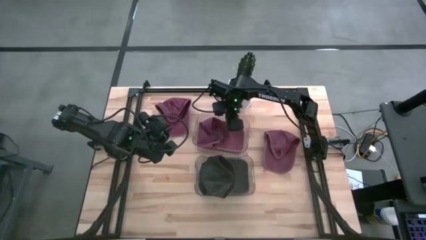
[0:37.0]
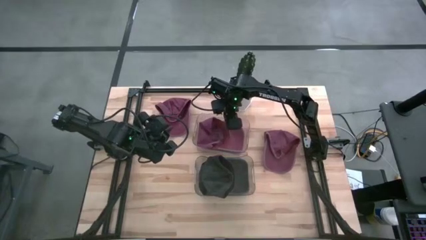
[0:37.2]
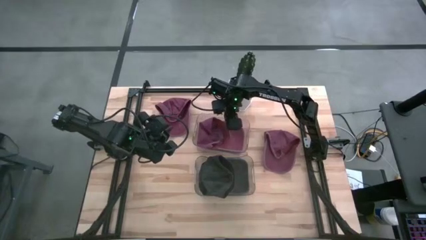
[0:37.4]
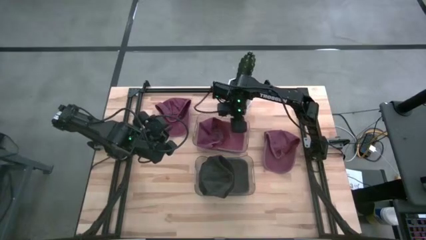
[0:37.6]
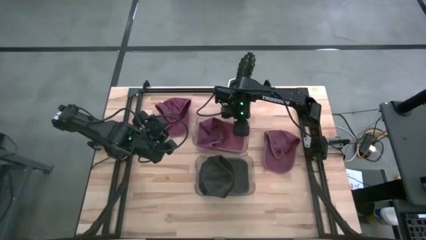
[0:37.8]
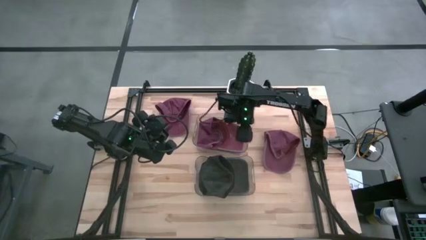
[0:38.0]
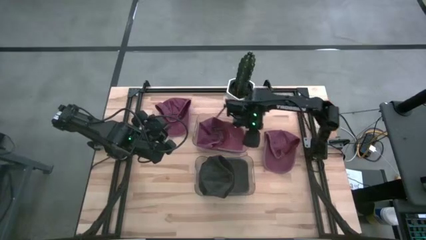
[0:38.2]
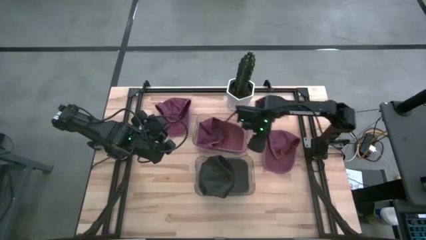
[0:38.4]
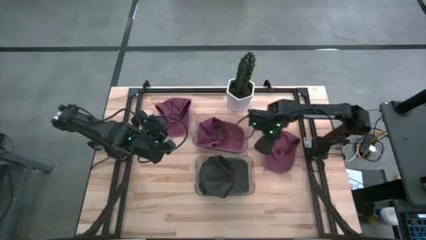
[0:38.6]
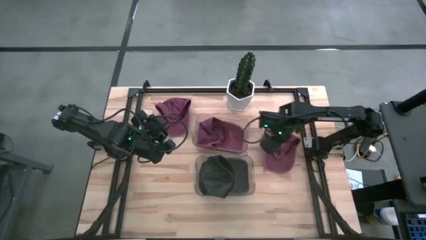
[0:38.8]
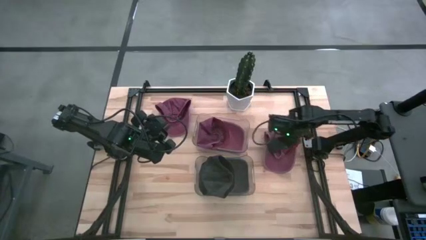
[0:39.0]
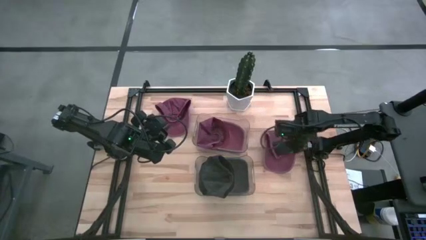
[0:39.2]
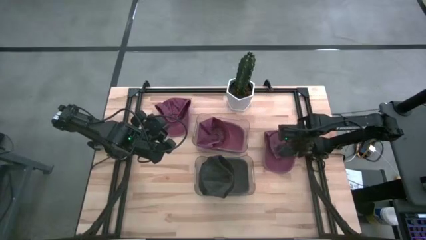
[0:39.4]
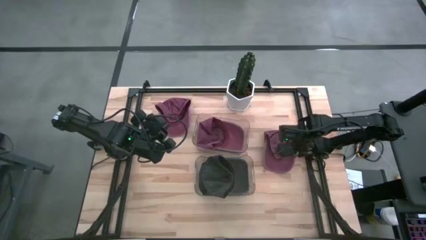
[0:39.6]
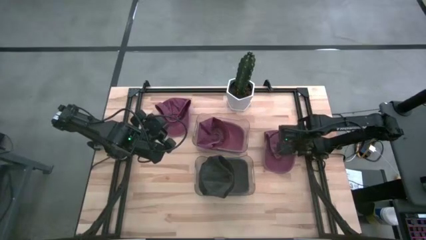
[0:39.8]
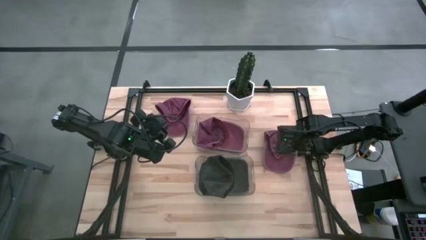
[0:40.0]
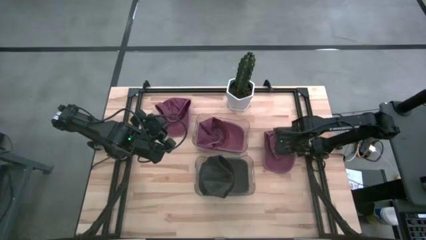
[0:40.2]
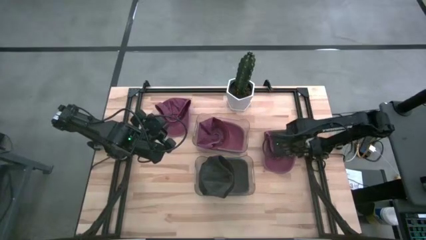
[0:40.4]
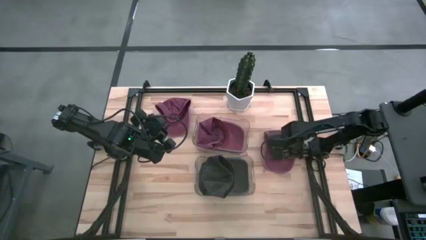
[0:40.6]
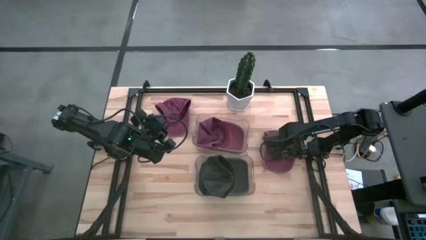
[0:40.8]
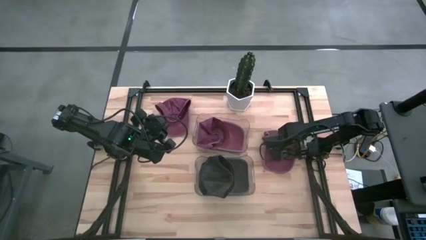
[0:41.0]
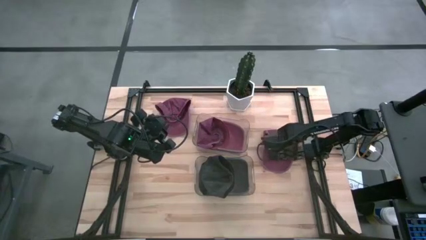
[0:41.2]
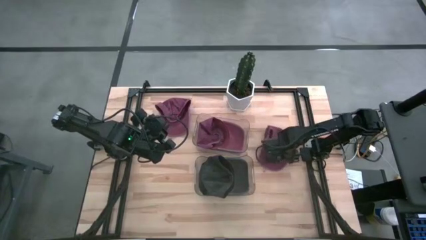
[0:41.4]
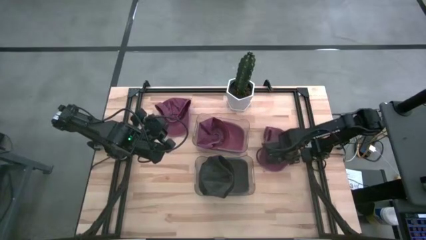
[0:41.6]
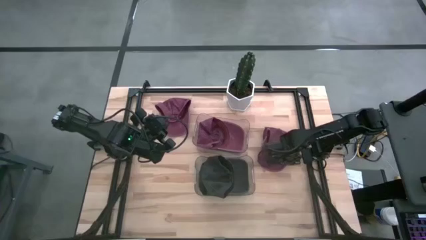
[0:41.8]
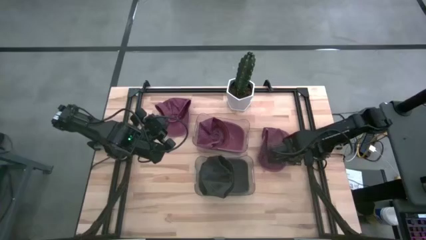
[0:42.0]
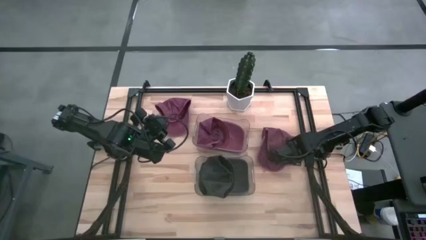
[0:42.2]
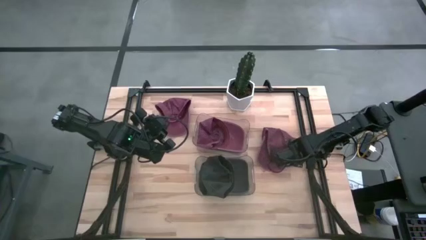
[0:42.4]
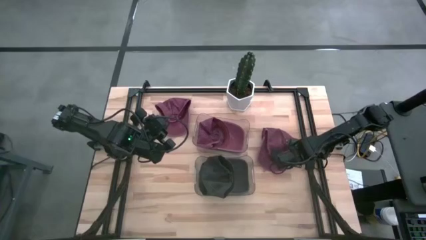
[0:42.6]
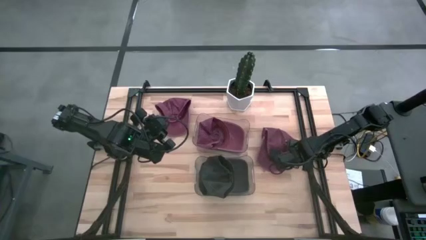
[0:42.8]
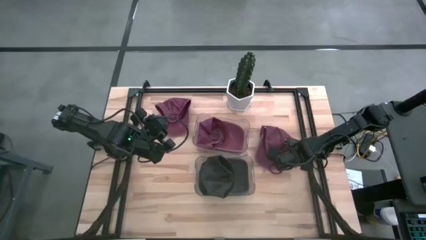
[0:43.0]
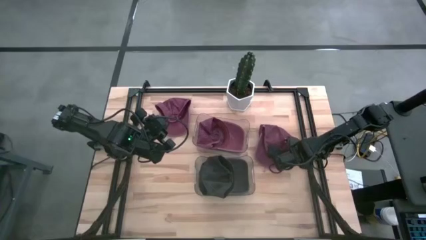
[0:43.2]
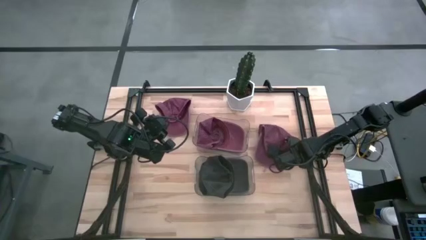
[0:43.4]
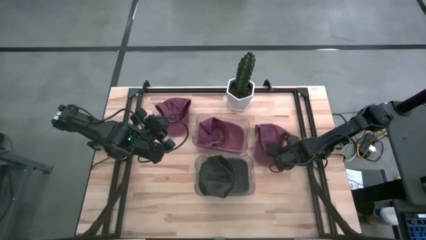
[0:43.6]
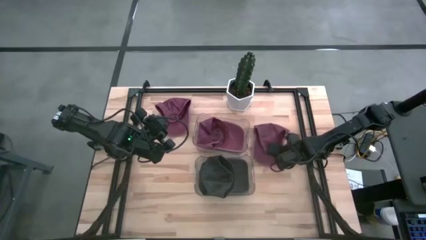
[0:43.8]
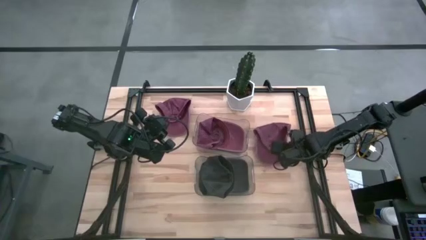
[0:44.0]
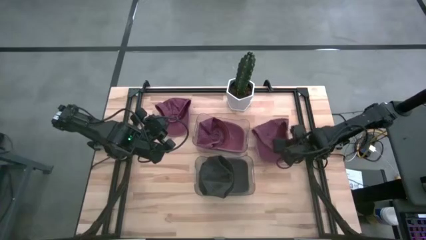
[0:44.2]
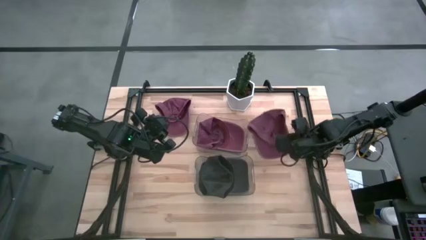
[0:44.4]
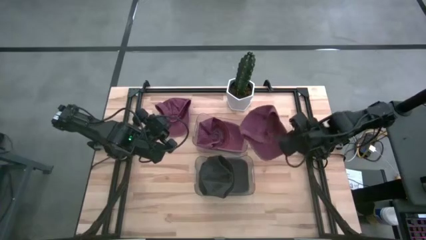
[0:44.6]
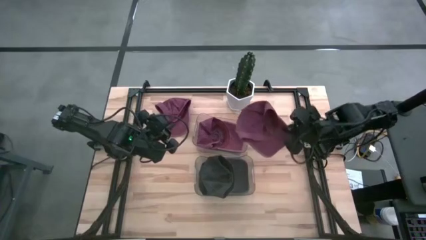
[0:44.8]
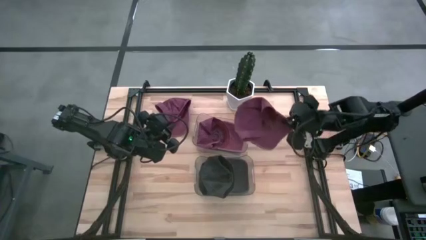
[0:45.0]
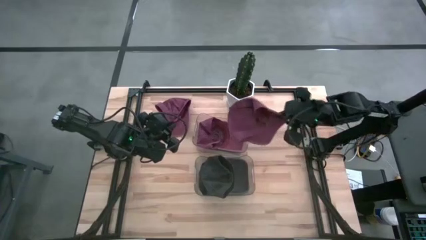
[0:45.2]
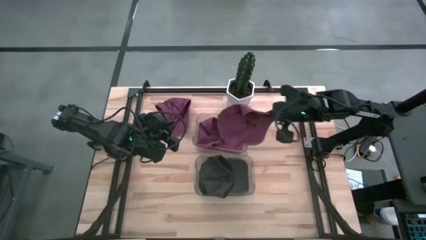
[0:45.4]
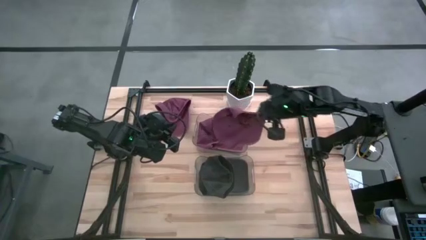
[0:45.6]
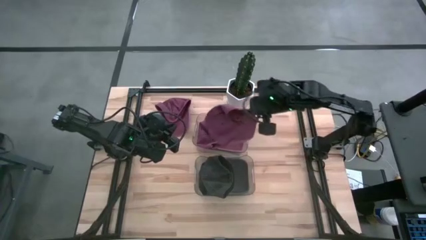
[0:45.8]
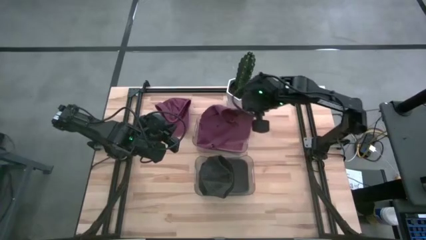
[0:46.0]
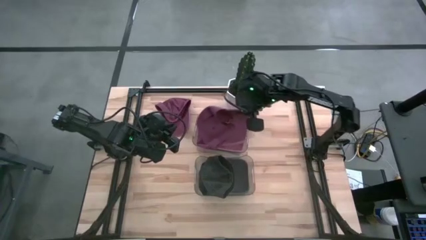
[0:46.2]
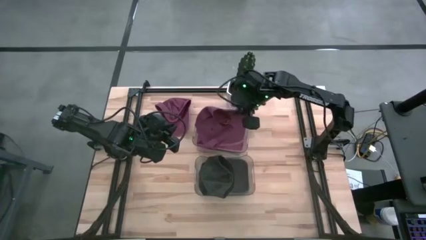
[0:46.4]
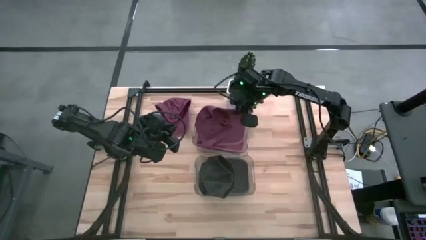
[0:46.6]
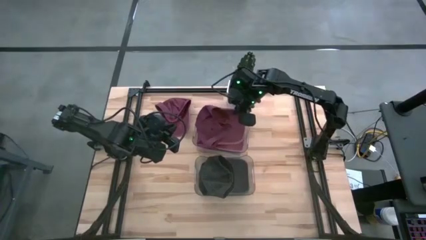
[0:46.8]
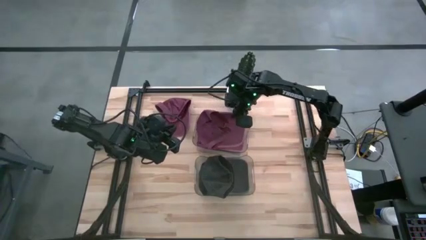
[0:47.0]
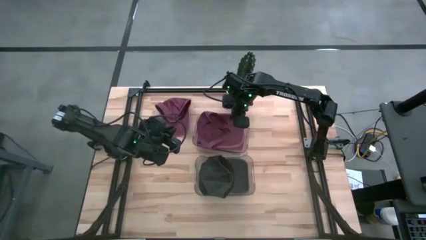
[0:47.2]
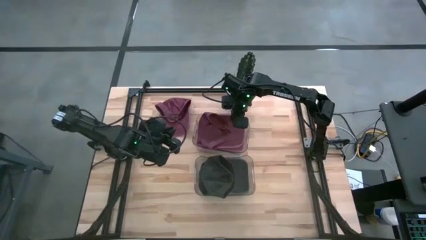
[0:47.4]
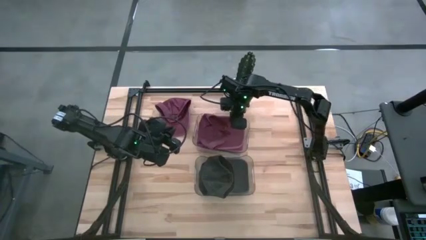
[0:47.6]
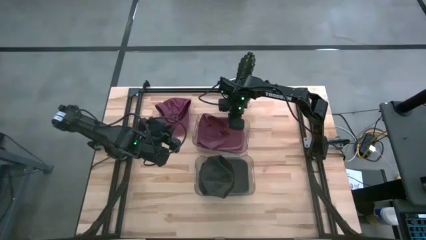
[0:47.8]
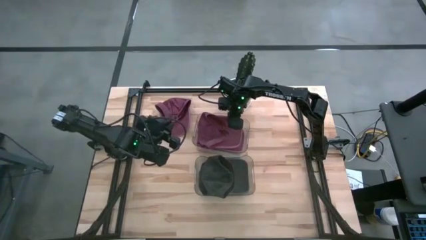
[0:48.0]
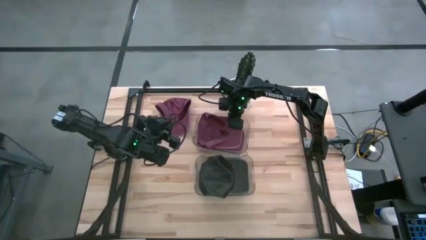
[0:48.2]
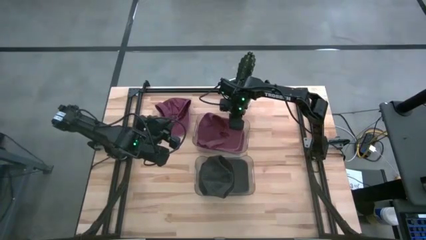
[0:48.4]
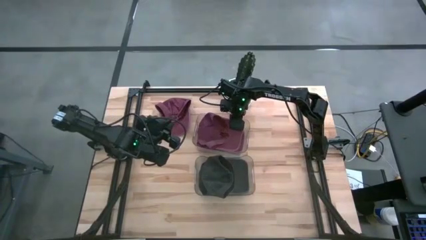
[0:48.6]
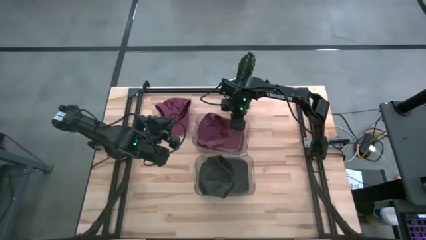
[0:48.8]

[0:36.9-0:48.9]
Task: Pick & Place hat
Put the right red cap into the top transparent bin
